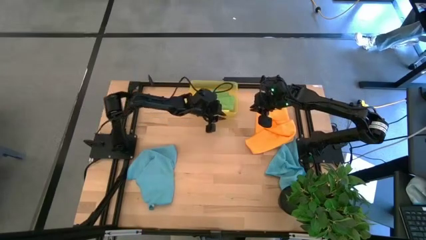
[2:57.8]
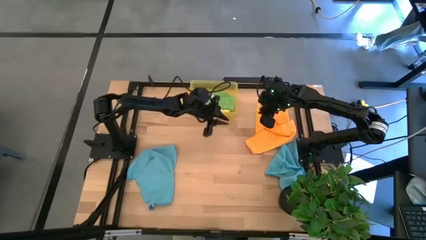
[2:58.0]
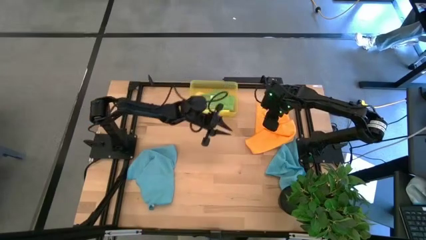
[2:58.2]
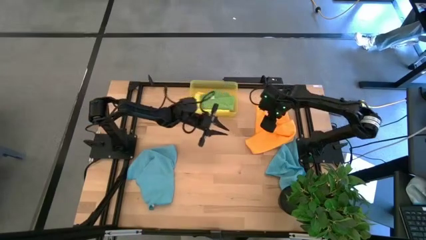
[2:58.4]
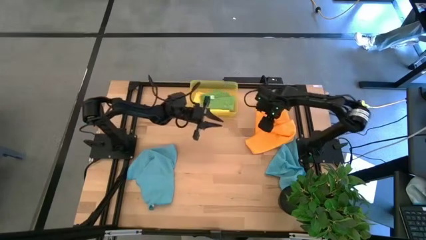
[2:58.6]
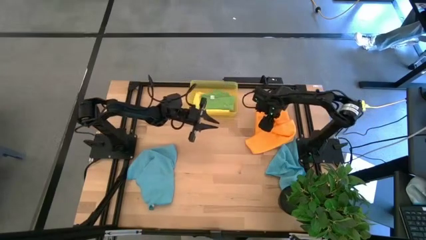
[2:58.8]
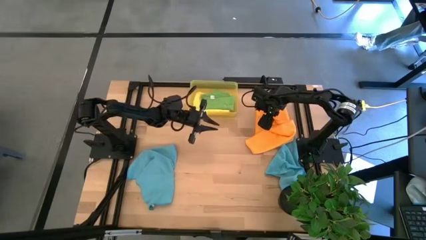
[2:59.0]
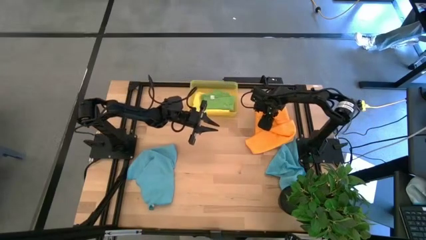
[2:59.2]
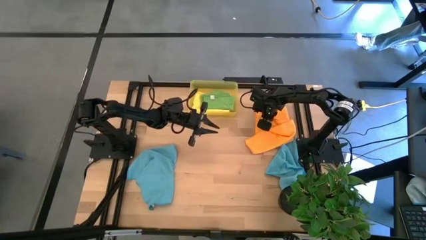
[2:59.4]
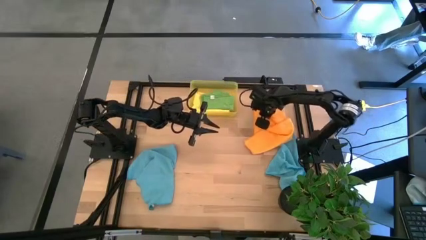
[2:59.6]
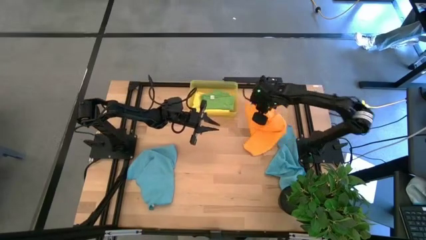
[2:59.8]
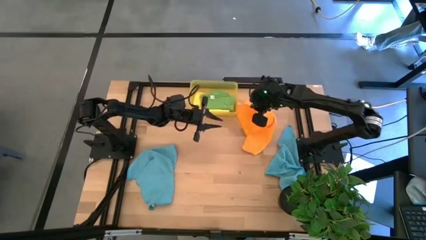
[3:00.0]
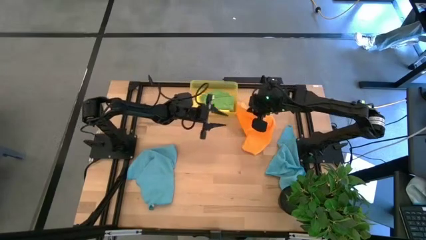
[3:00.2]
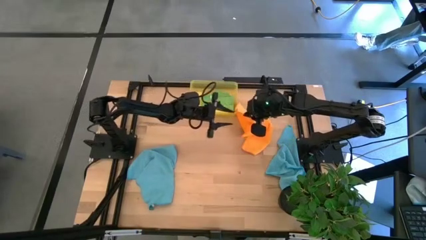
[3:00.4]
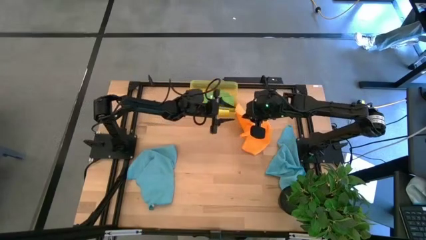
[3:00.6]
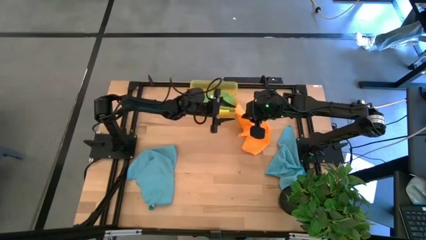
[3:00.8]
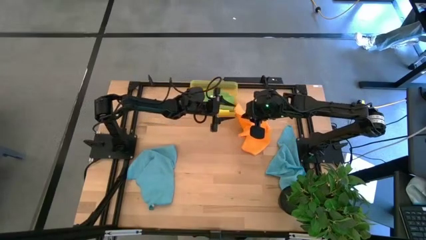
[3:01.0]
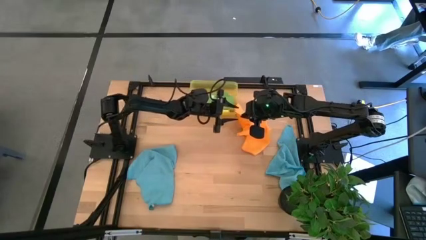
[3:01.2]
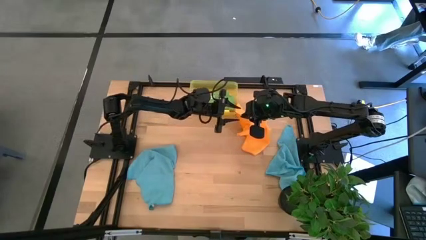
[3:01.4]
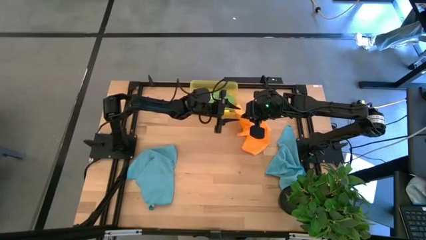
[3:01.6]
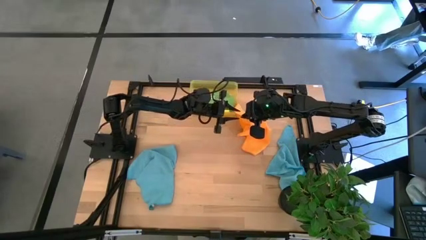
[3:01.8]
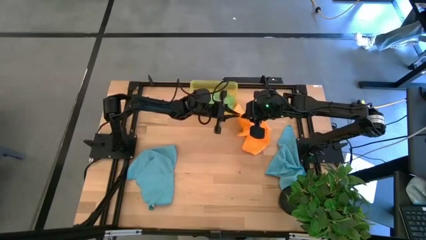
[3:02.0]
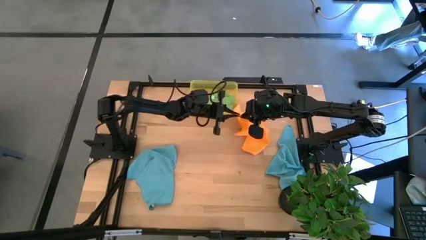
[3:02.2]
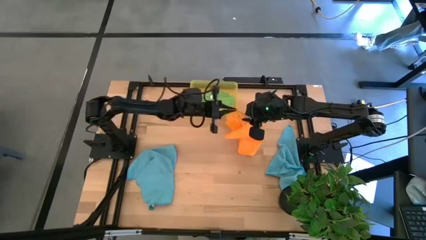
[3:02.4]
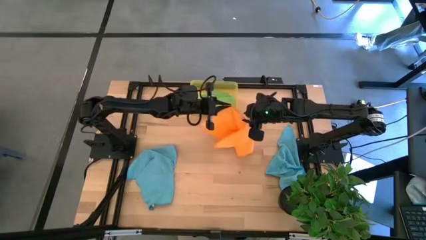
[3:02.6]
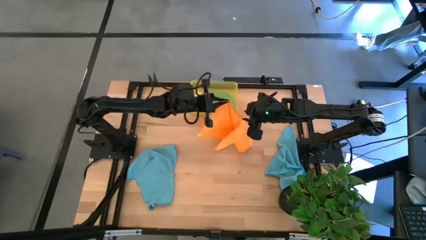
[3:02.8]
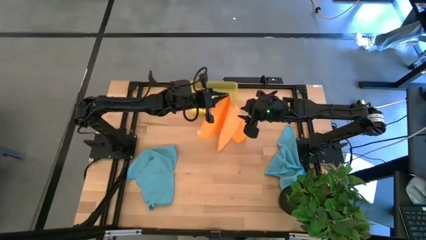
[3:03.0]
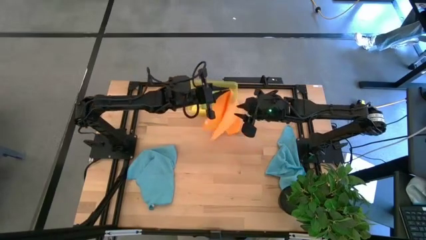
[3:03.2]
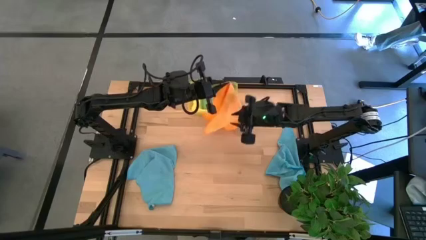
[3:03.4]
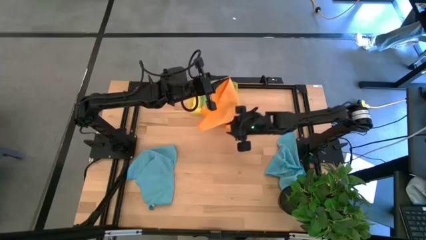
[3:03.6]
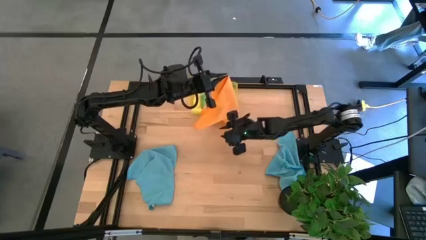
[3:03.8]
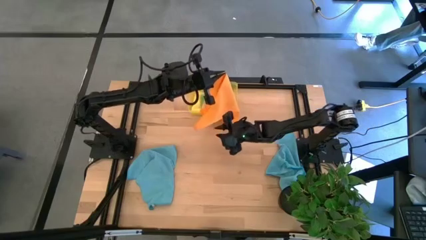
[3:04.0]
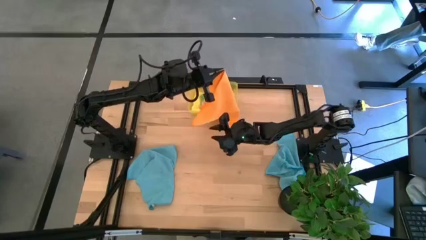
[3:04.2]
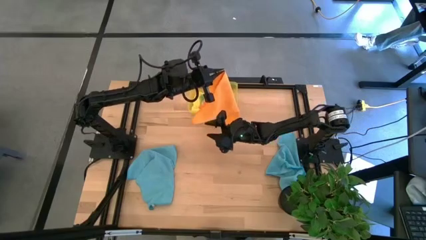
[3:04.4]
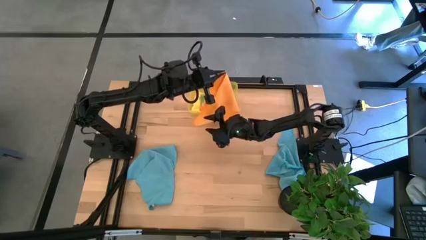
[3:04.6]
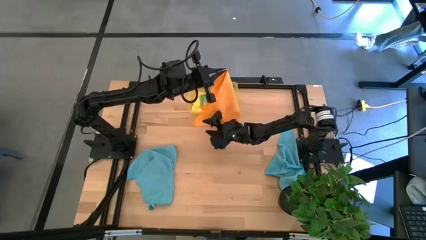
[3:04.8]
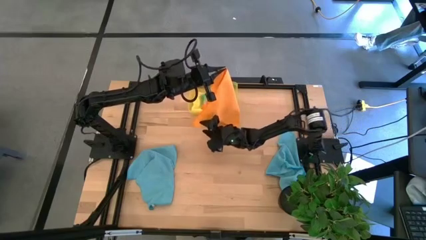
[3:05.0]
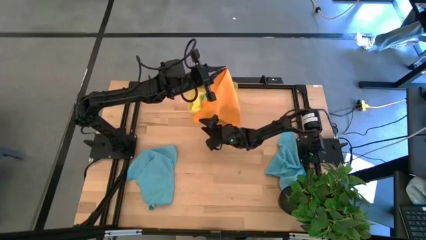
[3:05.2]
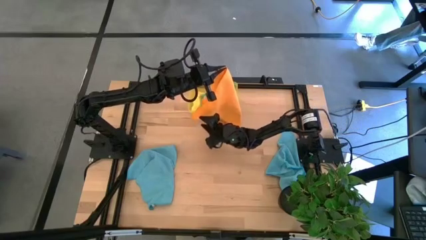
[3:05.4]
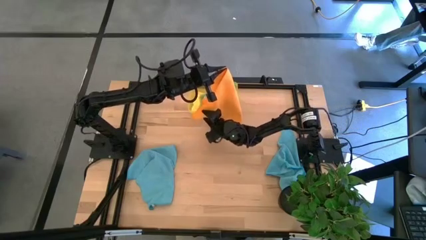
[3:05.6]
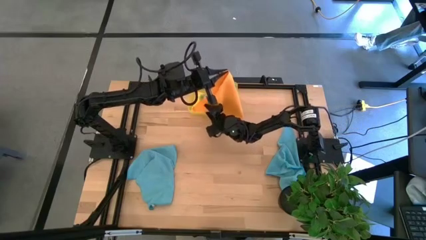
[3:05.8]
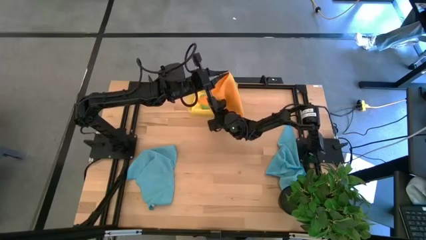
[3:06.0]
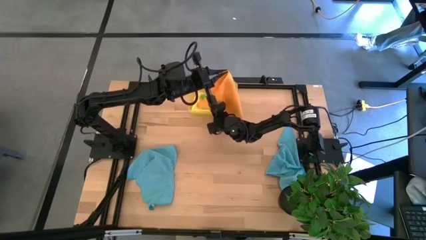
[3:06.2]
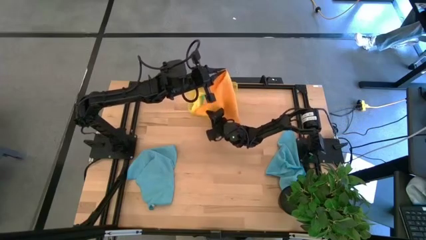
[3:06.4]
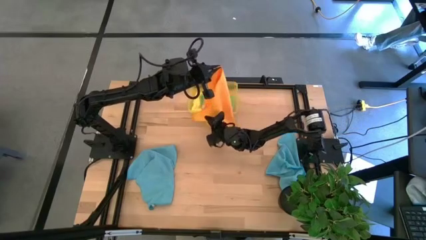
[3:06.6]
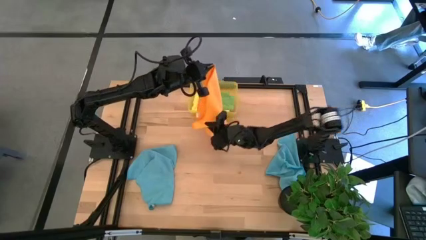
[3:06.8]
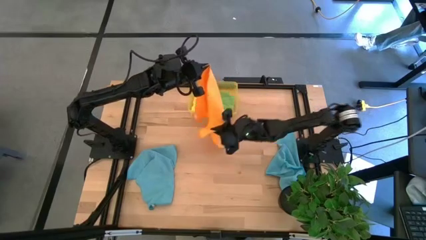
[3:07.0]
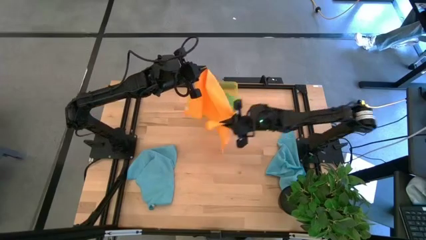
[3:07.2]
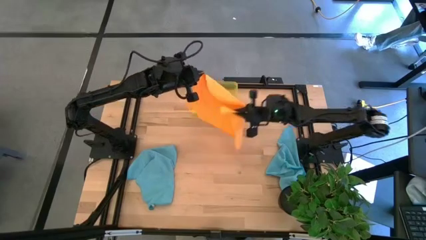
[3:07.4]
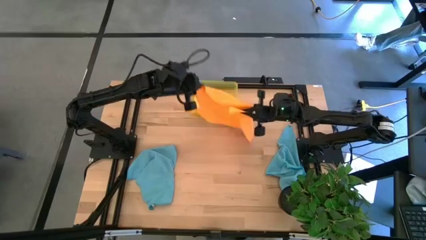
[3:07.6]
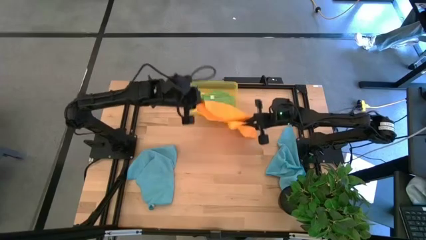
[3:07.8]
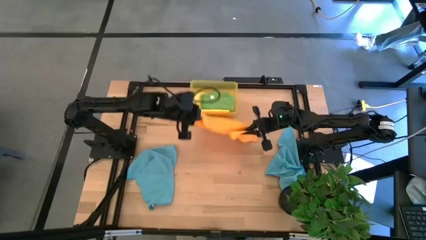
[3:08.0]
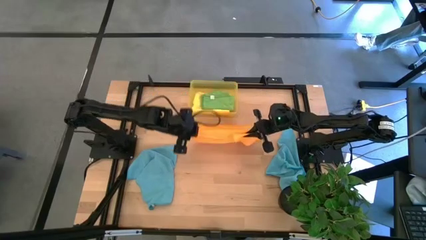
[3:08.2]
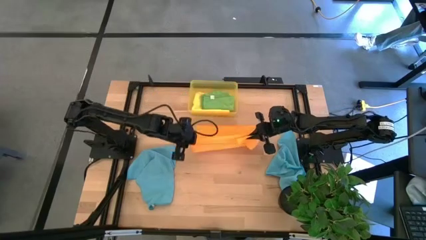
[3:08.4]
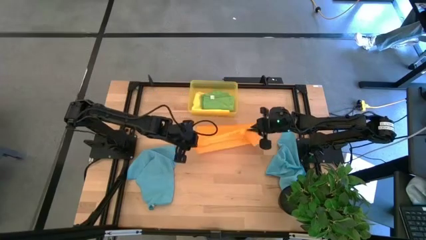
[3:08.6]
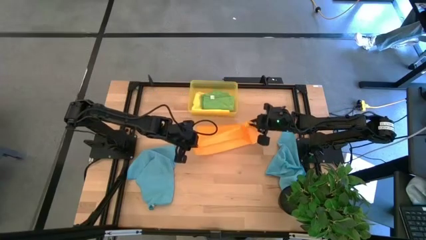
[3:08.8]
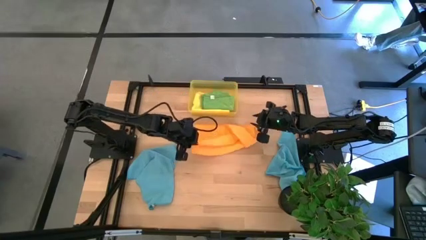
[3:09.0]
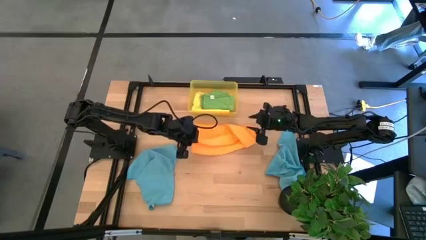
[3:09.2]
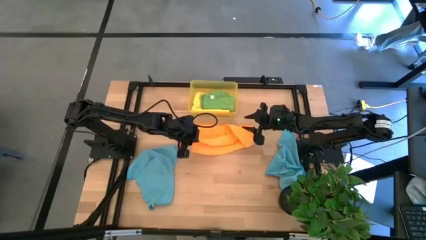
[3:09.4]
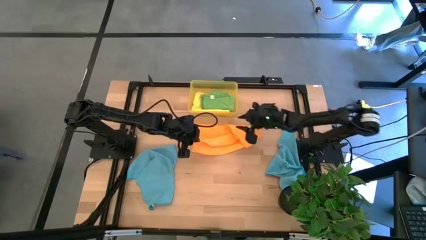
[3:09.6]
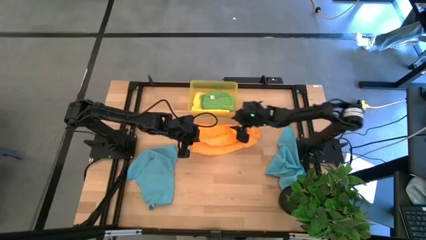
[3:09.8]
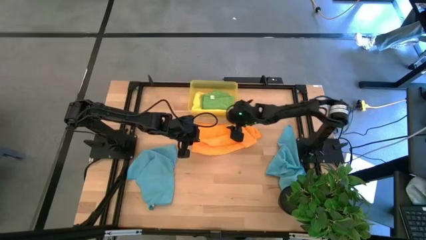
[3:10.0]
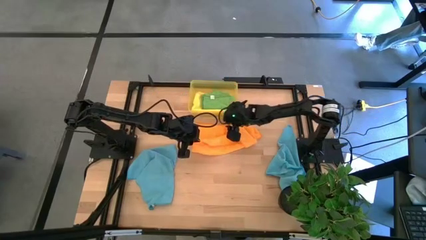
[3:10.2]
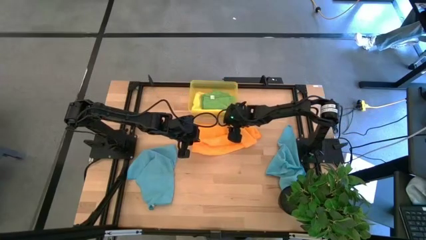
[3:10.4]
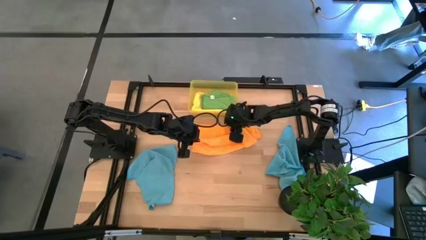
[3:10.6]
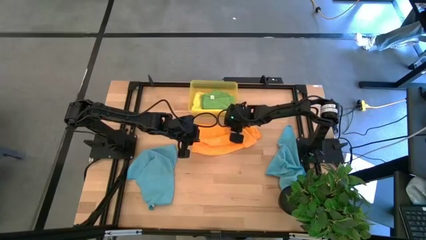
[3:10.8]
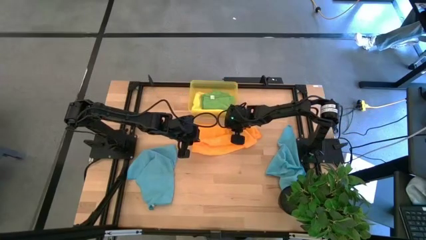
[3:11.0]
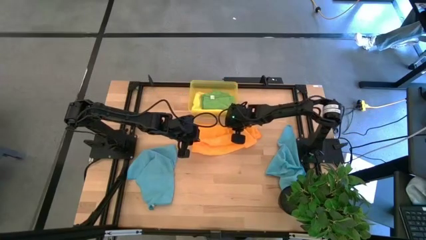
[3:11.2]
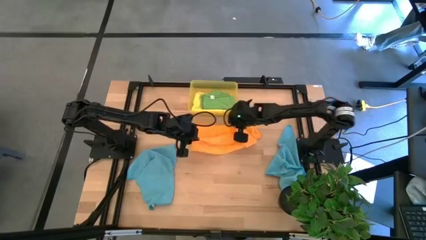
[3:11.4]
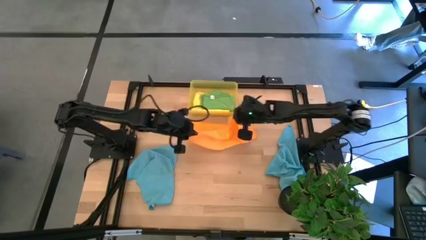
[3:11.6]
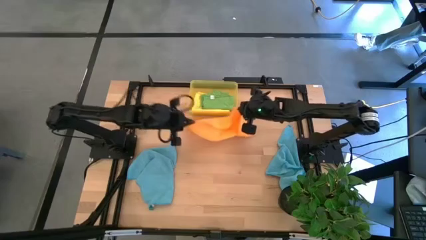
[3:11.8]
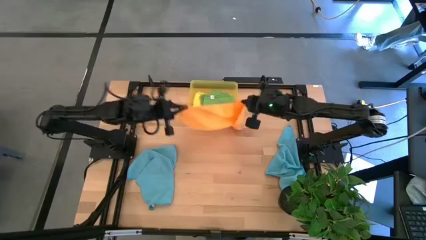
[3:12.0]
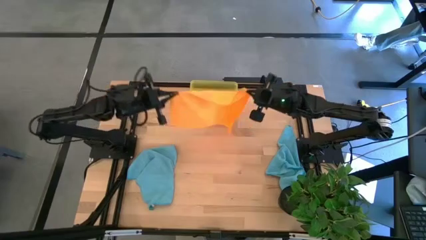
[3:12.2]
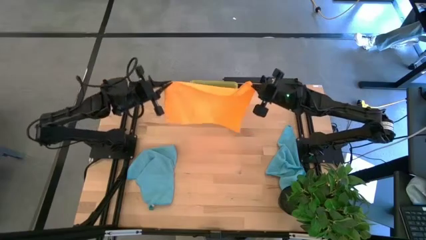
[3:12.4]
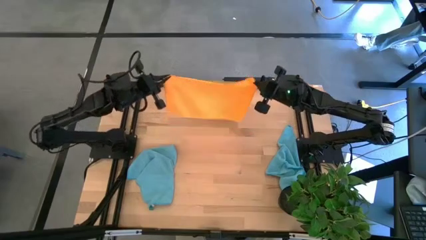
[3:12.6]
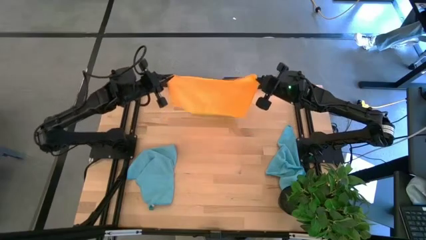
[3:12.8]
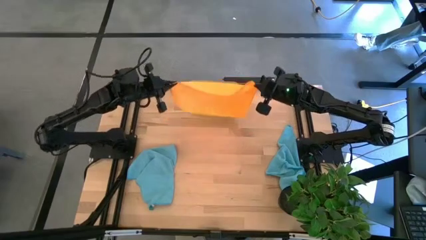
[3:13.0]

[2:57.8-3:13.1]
Task: Fold microfiber towels
Fold the orange towel

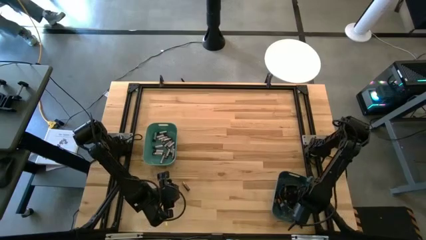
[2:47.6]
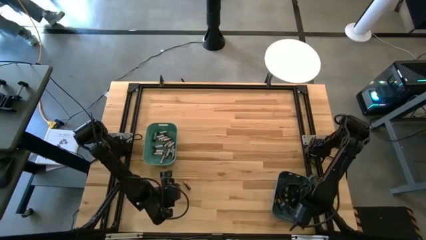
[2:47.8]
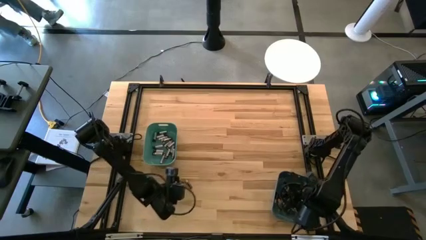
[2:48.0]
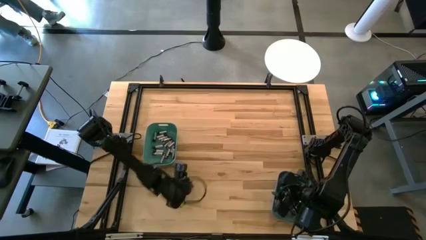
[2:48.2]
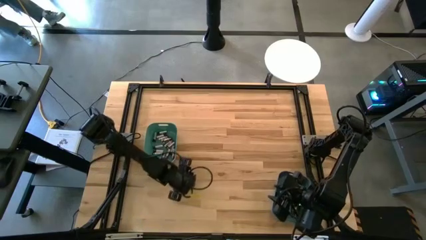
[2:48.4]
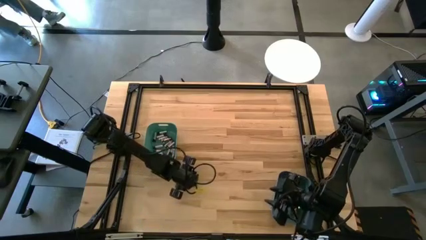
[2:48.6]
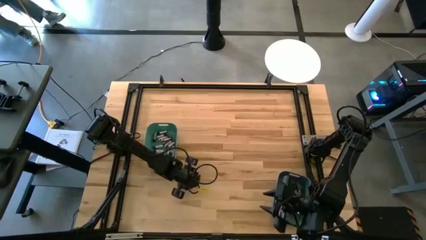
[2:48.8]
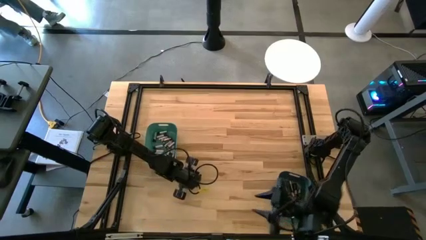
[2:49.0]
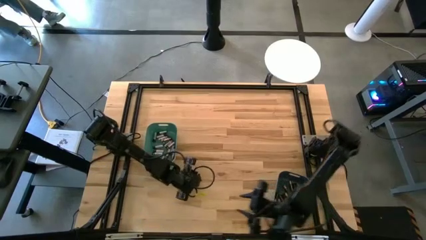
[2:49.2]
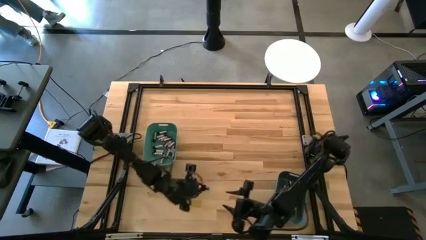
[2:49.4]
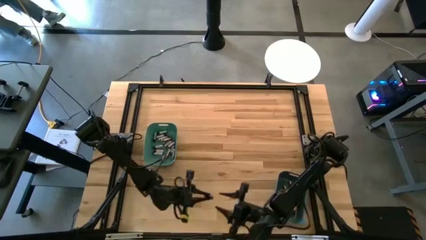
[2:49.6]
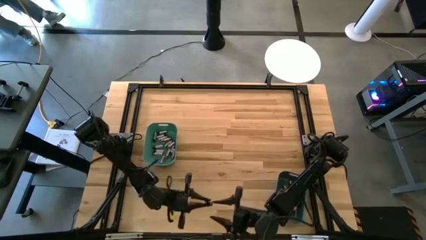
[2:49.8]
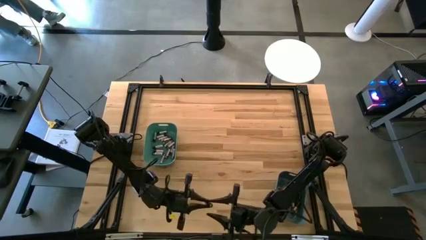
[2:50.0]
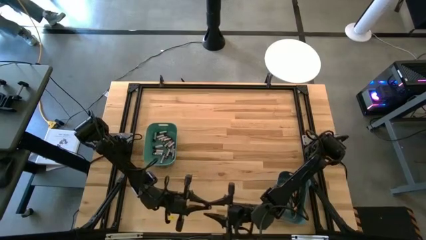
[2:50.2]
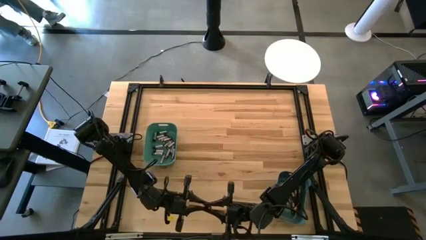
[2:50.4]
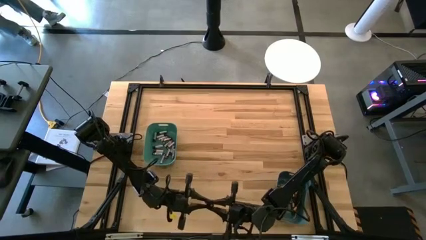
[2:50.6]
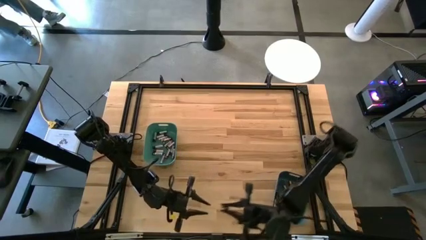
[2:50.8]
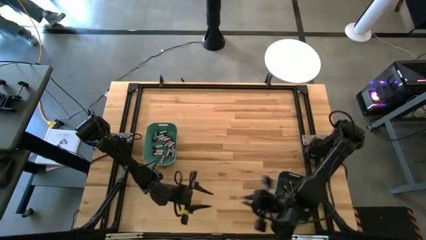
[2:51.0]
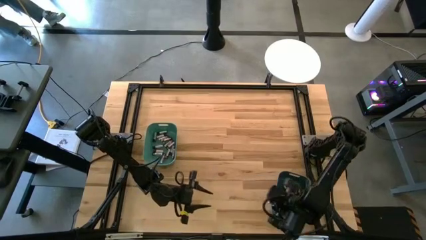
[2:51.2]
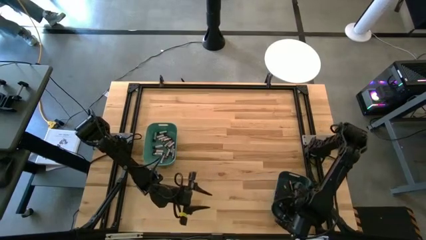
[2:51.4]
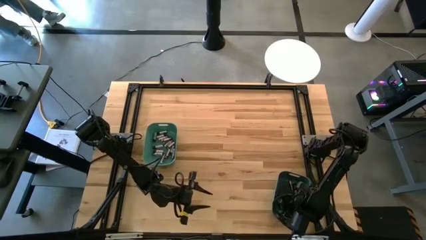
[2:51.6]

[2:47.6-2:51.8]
Task: Sort batteries
Put the black battery into the blue bin
